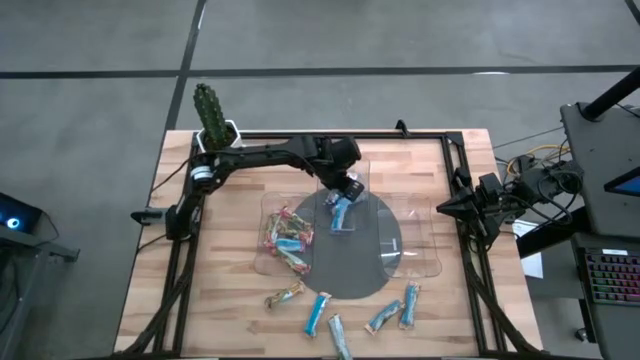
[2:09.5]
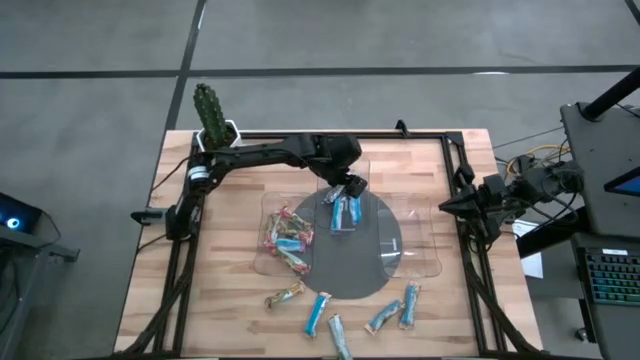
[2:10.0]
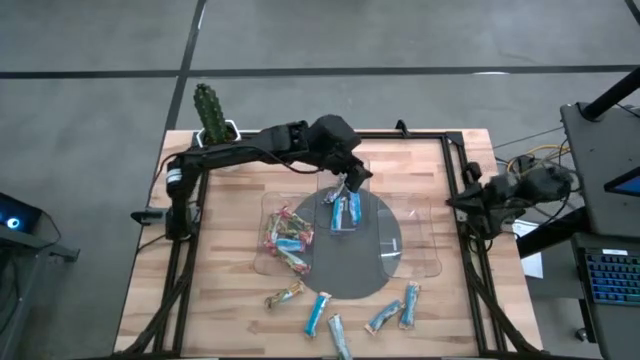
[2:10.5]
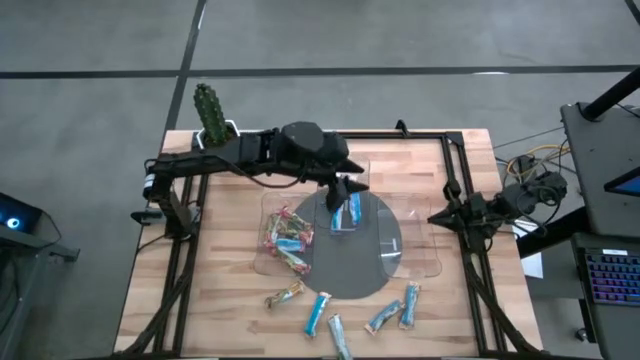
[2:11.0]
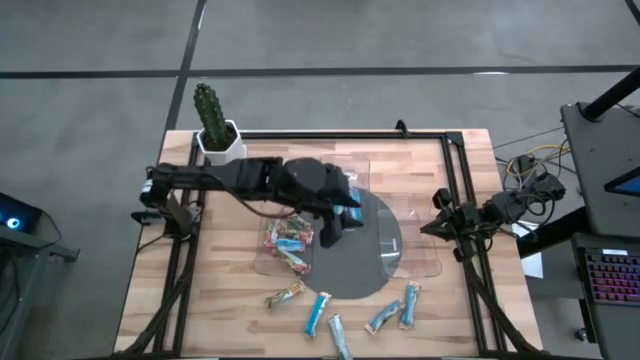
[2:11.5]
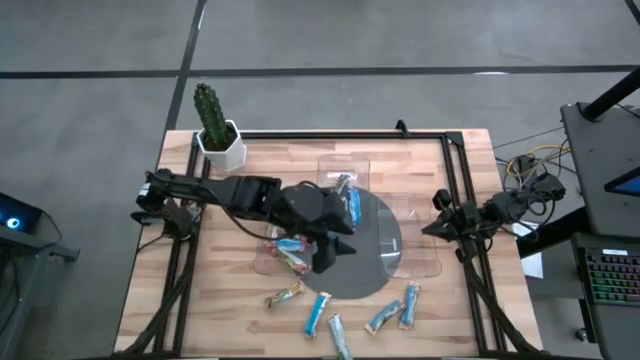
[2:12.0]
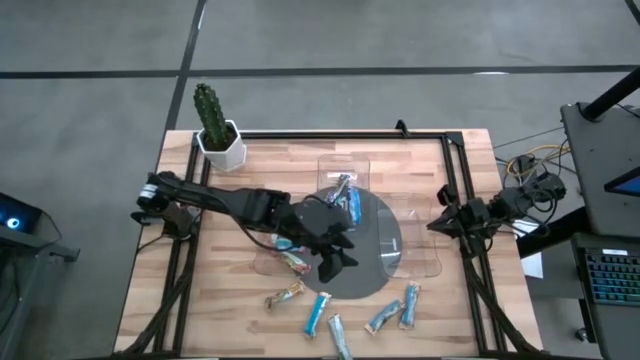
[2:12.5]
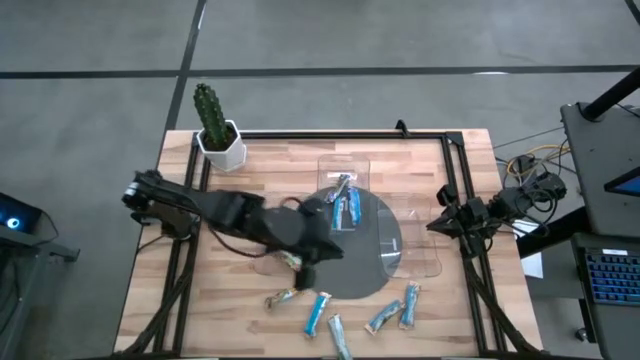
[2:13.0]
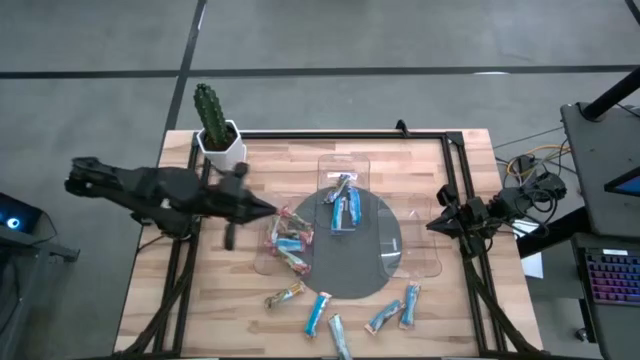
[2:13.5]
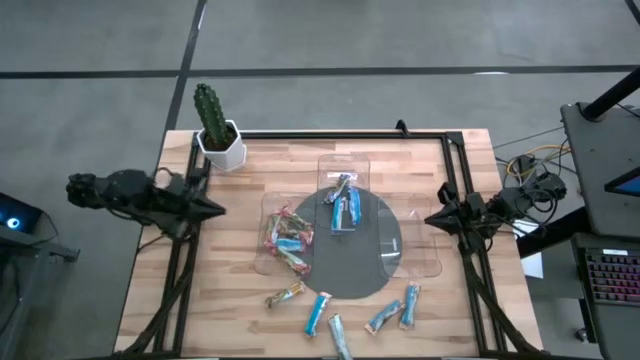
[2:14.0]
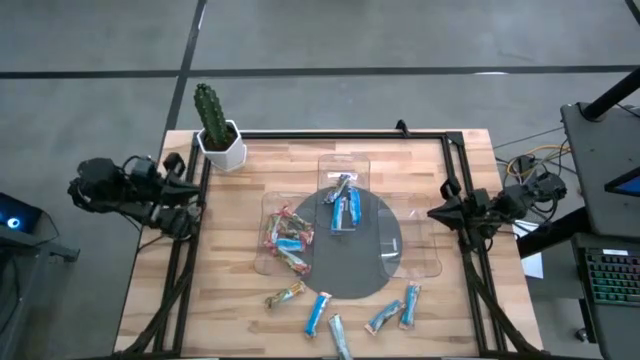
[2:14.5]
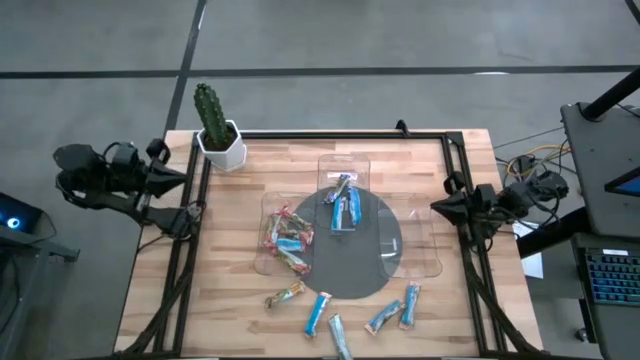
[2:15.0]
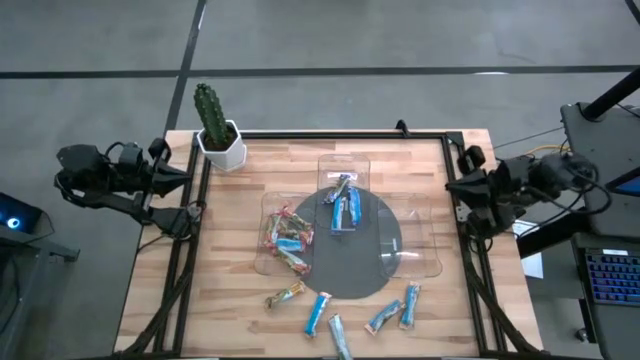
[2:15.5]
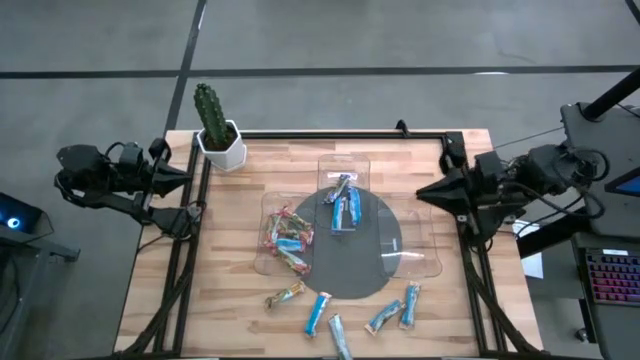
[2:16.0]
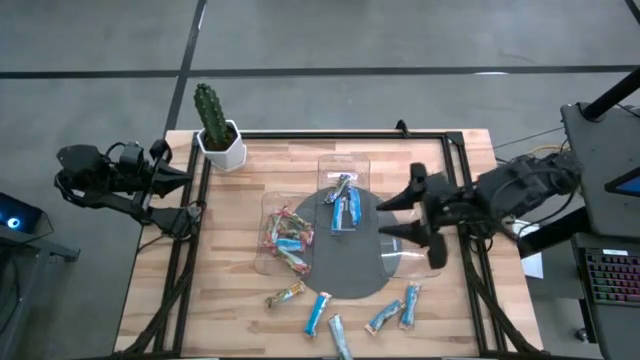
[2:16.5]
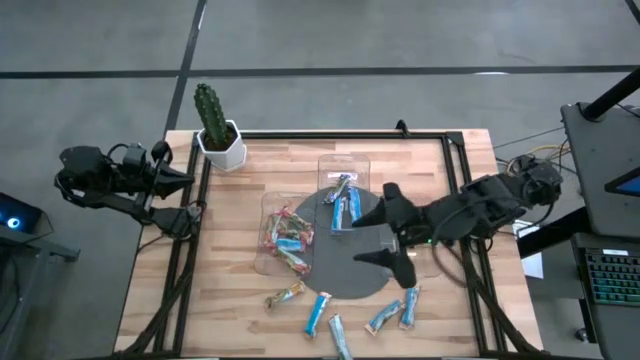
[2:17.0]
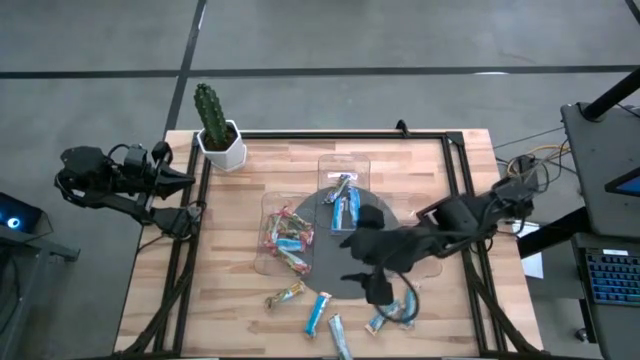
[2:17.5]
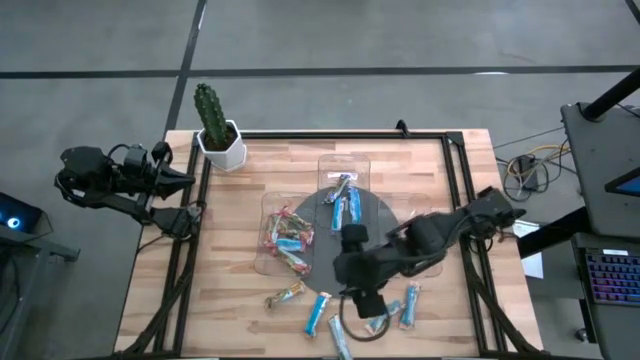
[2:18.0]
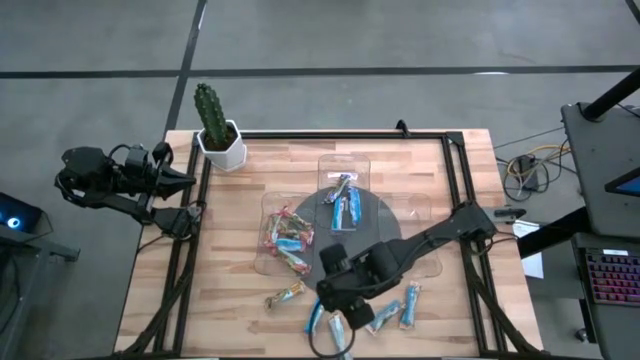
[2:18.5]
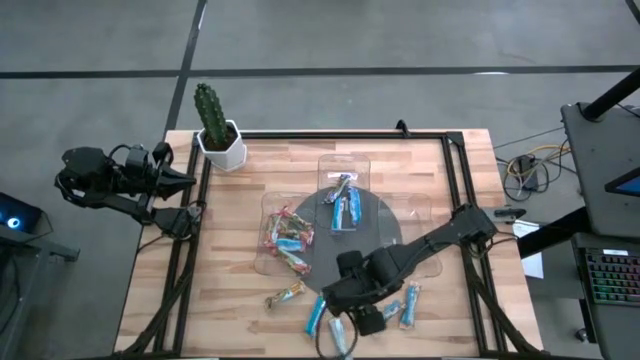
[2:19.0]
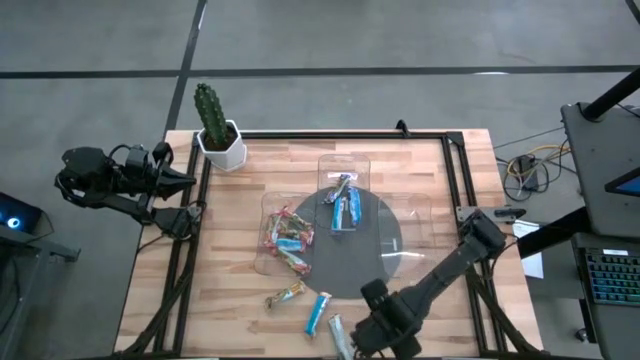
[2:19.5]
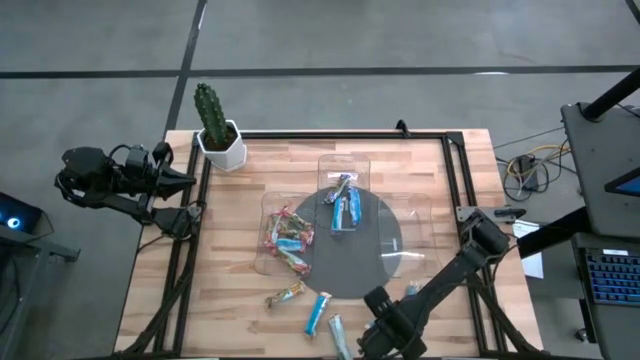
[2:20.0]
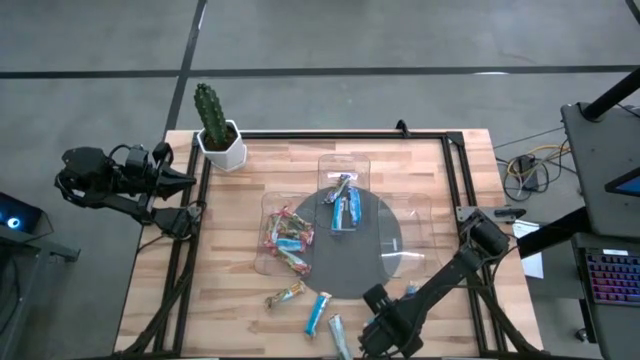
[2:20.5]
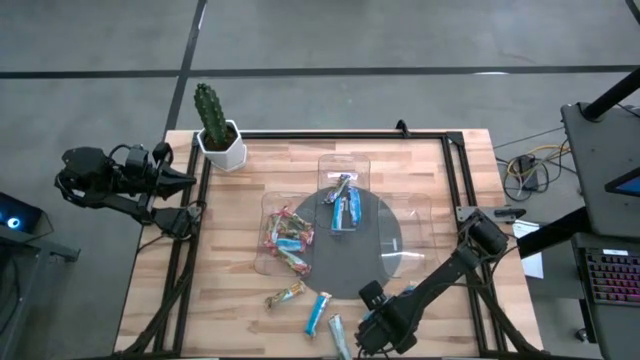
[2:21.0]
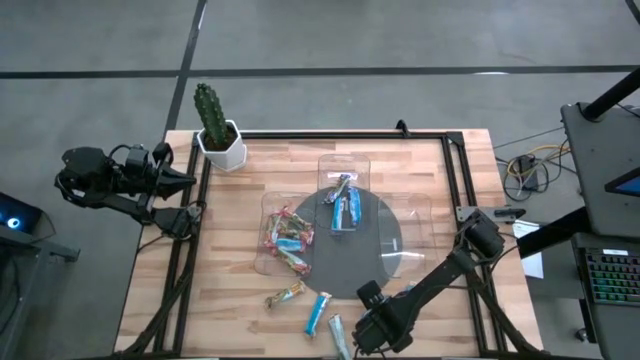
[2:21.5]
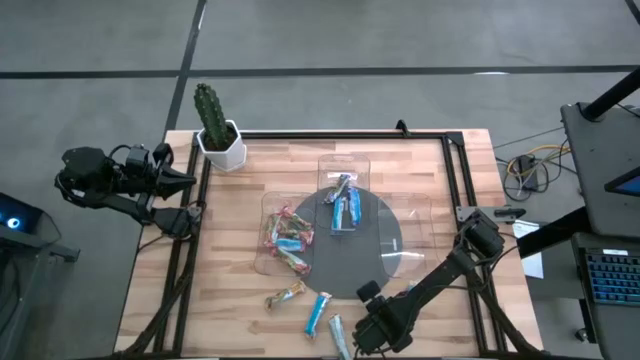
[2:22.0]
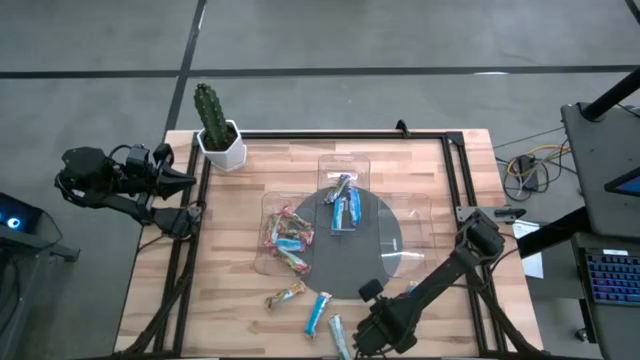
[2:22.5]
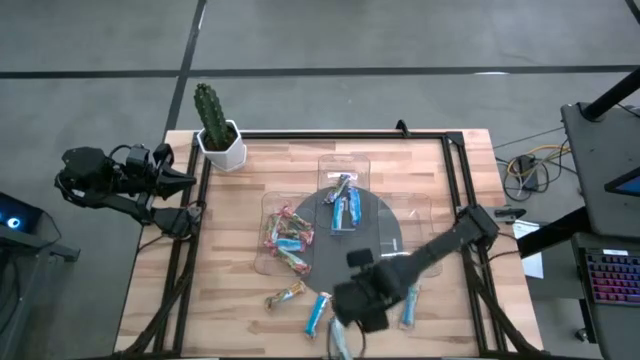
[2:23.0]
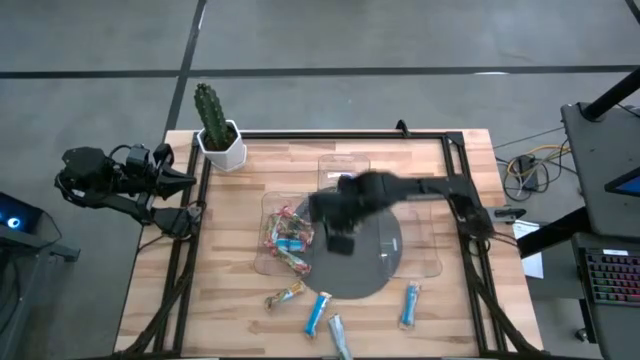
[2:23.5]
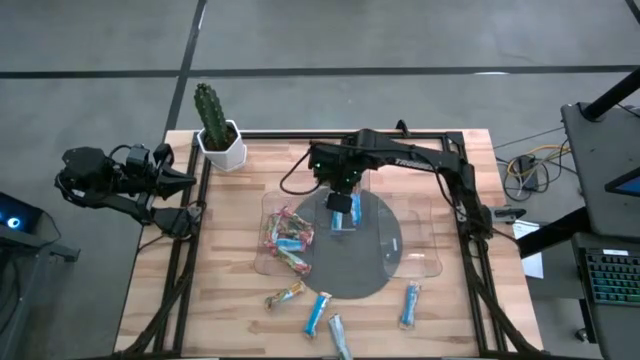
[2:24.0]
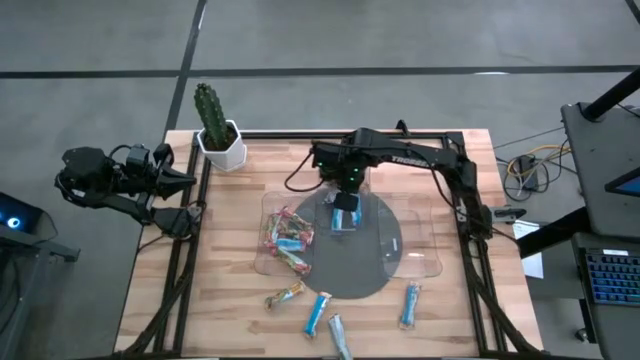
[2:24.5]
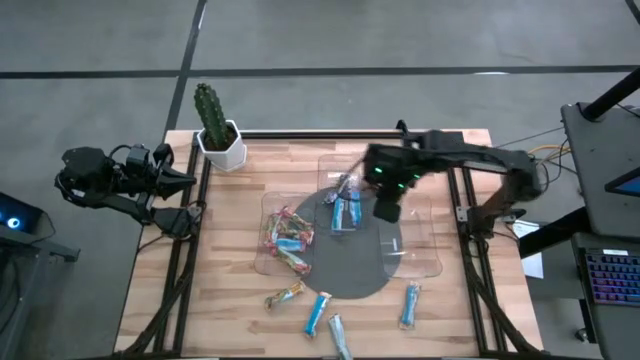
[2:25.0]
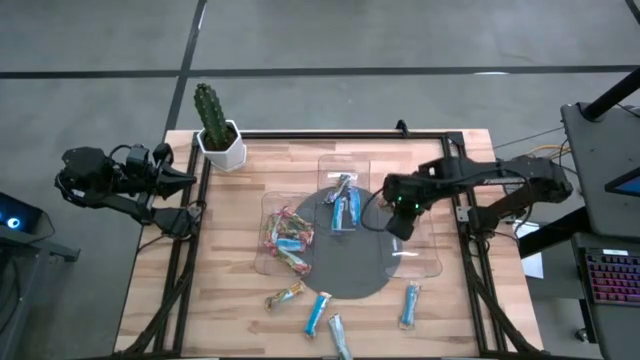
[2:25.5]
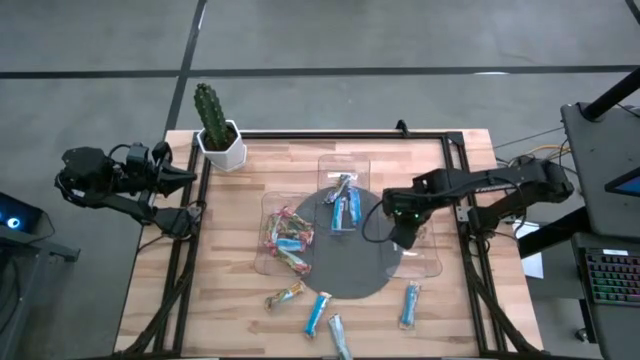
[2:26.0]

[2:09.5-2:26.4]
Task: Pick and place Granola Bars by type
Put the yellow granola bar into the right transparent bin
